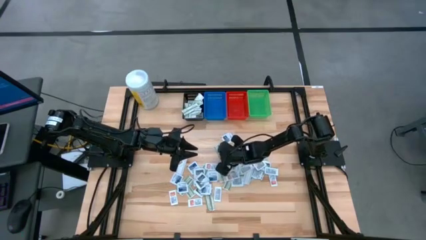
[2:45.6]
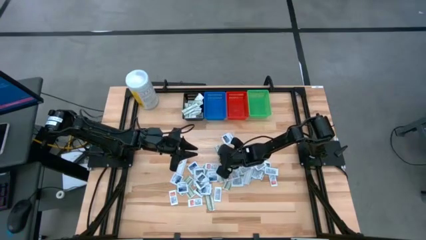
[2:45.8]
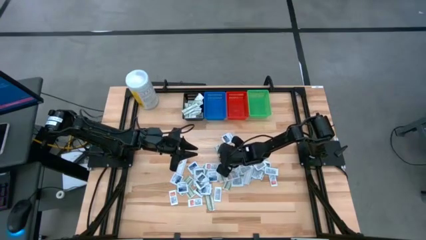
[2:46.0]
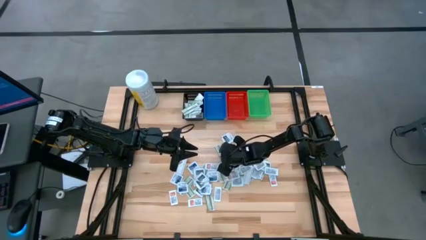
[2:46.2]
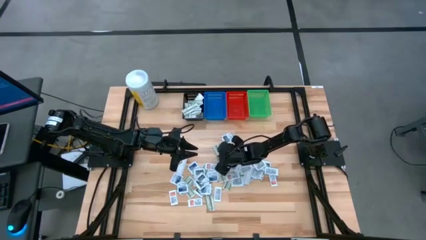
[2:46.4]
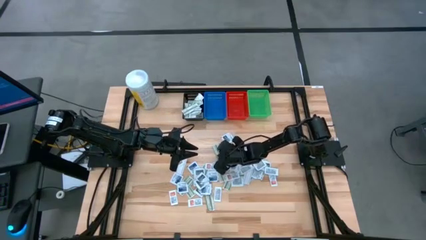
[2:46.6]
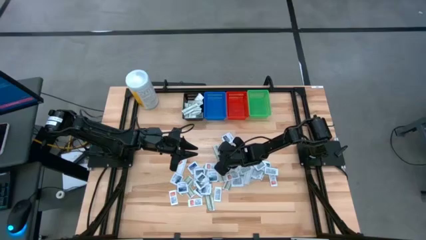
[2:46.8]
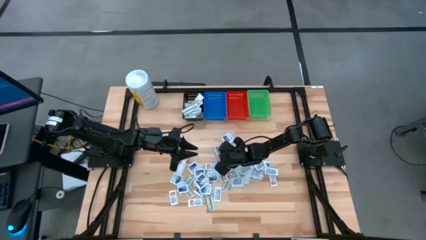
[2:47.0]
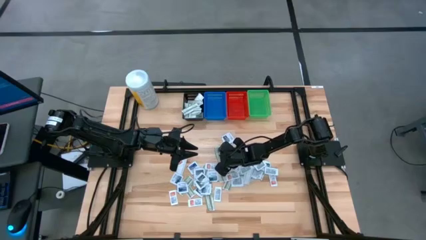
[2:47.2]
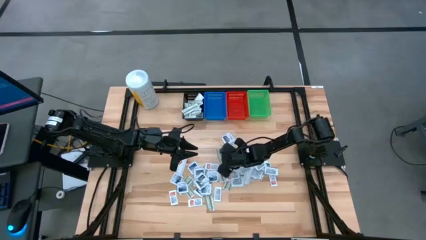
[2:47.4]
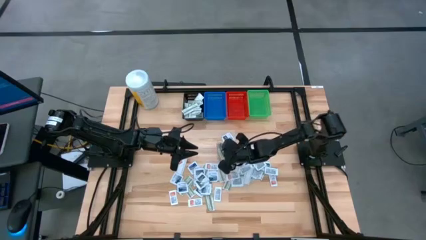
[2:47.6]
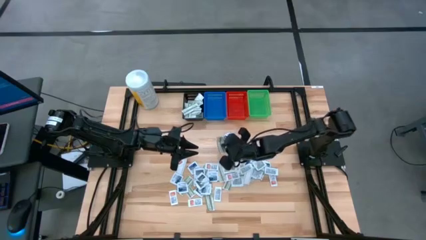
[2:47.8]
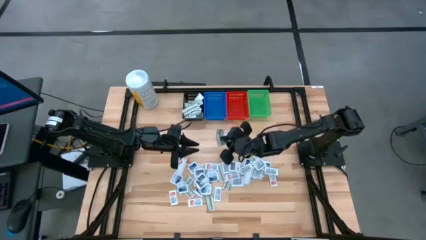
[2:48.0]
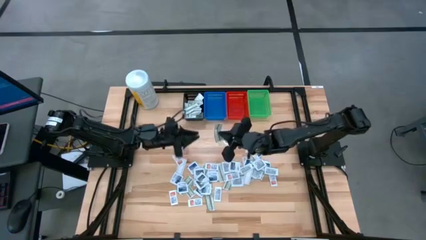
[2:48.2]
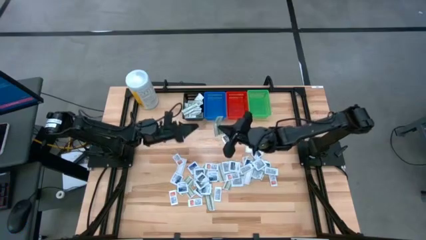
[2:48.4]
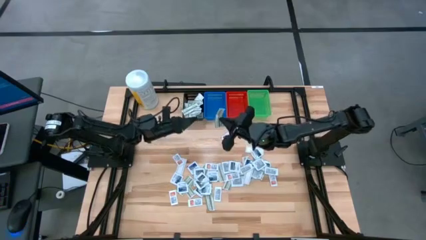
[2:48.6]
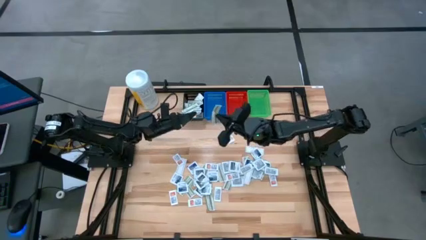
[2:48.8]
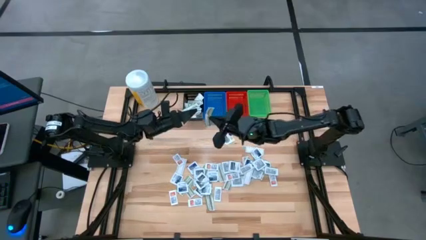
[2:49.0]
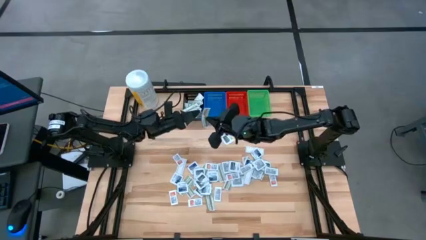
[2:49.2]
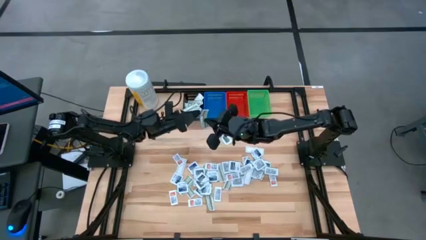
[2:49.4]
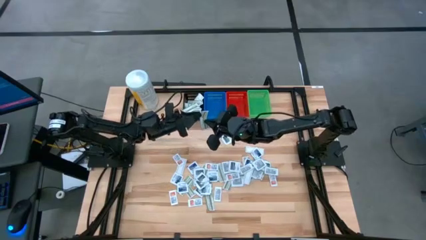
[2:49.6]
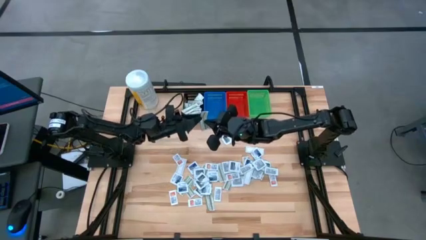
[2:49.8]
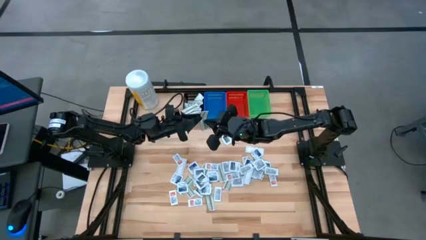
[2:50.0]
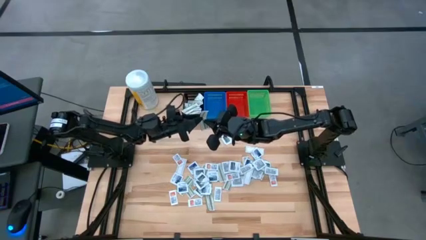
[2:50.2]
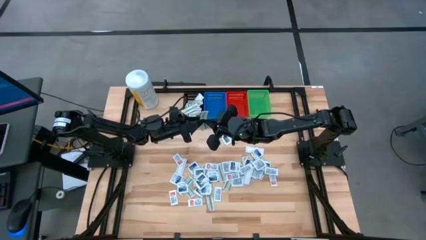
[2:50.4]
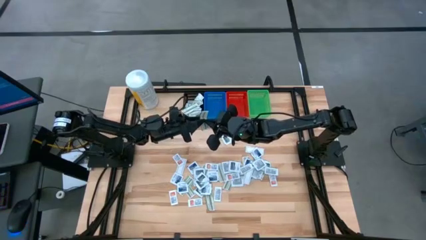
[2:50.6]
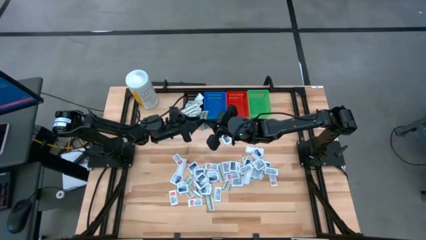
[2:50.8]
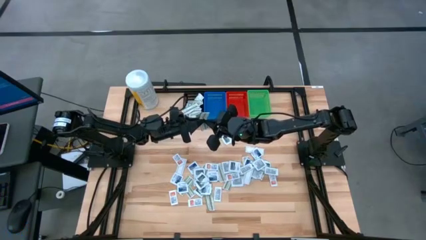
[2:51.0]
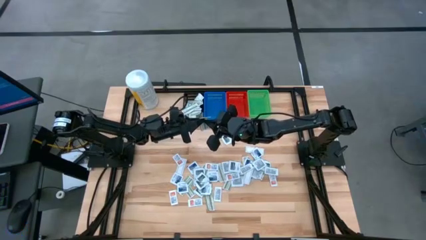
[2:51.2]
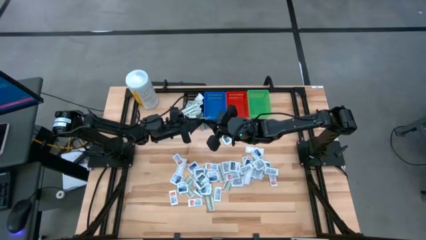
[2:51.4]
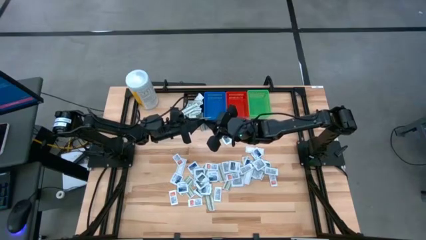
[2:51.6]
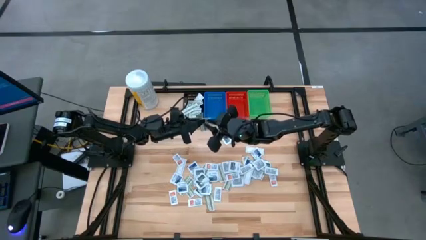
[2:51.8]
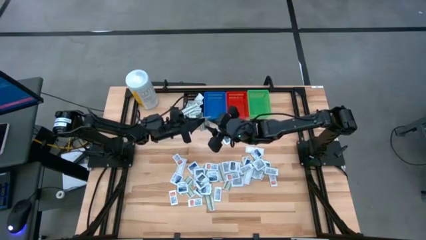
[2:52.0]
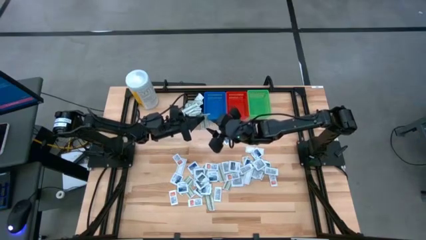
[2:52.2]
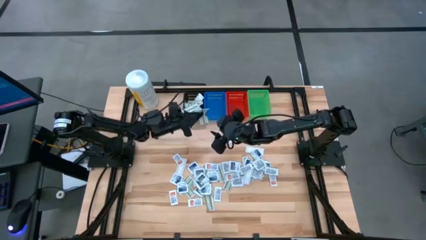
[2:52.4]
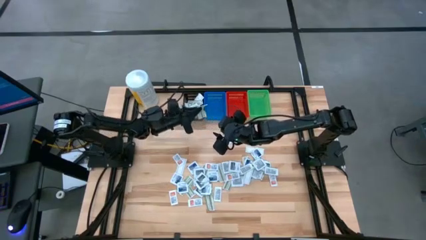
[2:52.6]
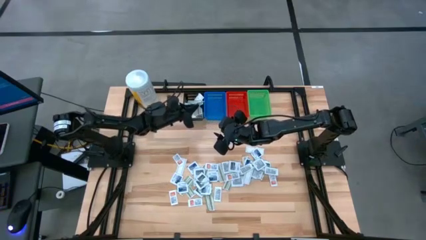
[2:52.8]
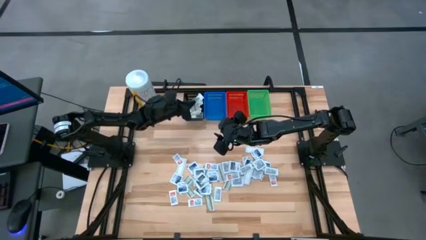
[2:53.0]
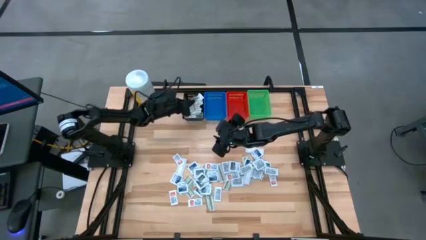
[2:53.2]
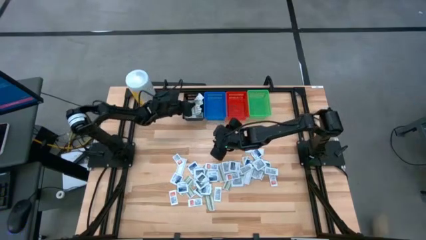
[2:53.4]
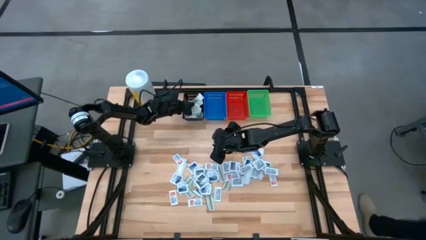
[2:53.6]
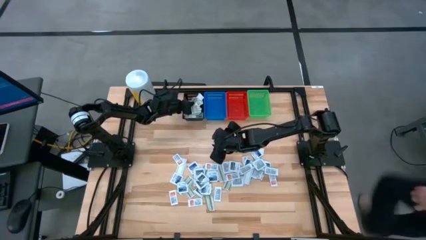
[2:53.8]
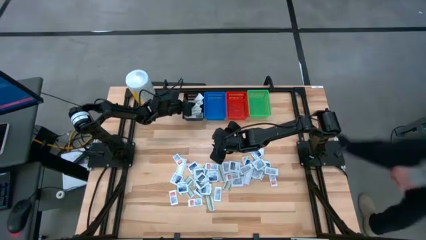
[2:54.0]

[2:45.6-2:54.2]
Task: Pick & Place First Aid Supplies
Put the green bandage pack in the black bin

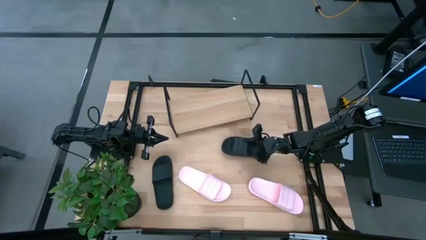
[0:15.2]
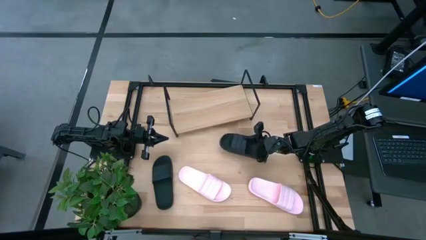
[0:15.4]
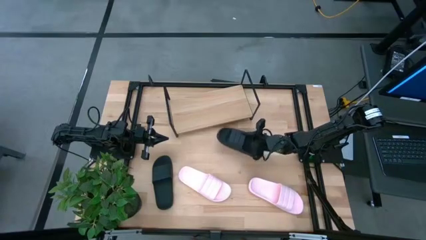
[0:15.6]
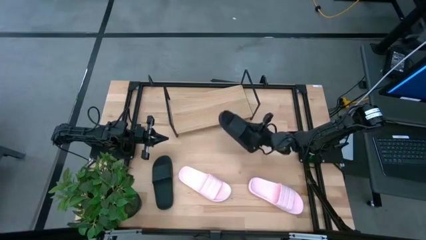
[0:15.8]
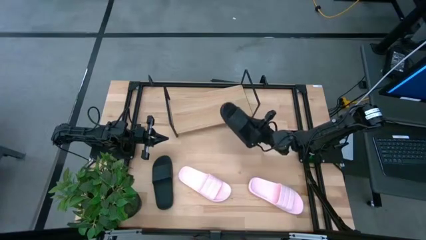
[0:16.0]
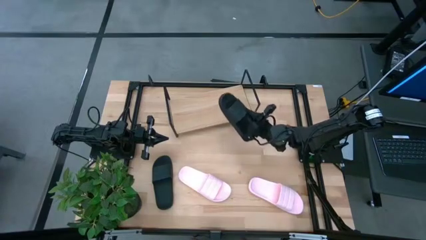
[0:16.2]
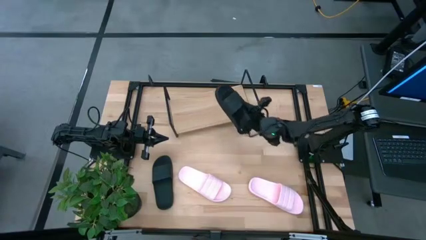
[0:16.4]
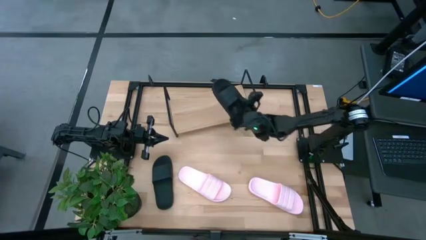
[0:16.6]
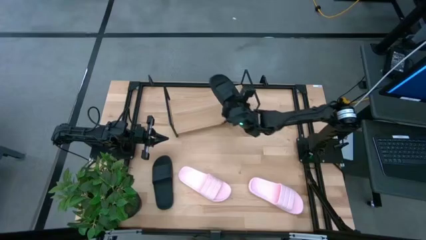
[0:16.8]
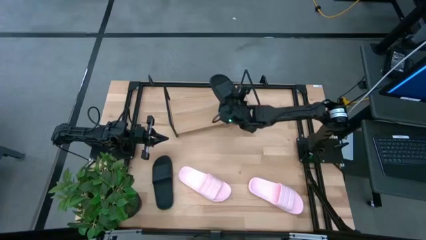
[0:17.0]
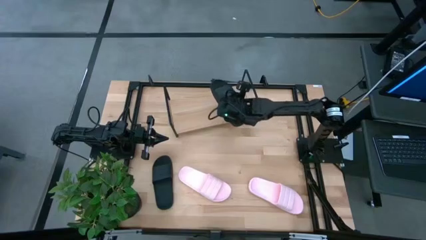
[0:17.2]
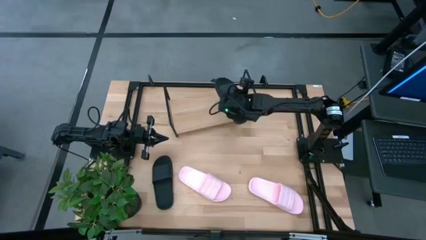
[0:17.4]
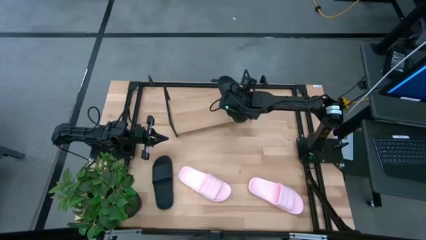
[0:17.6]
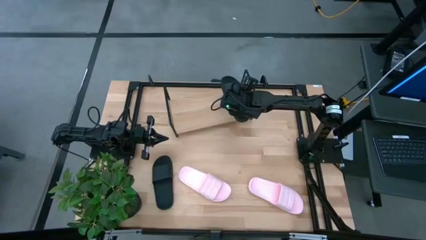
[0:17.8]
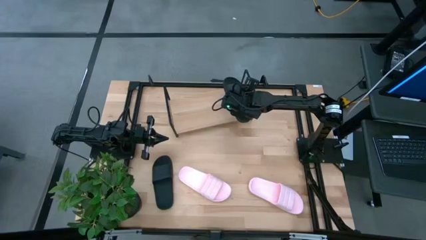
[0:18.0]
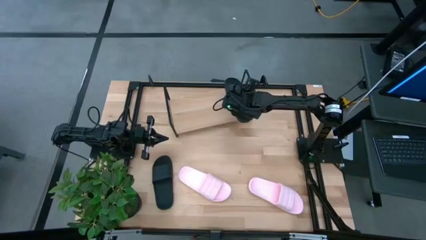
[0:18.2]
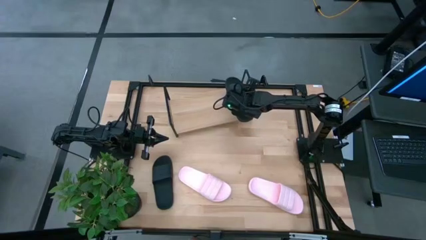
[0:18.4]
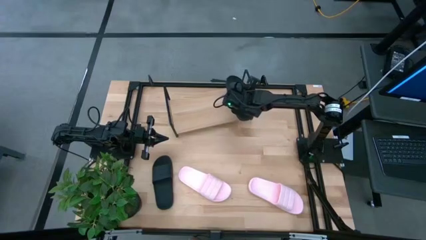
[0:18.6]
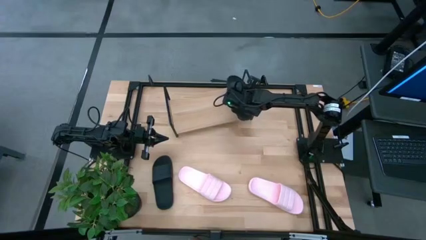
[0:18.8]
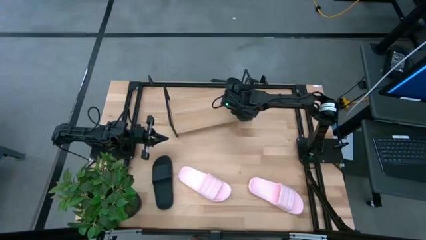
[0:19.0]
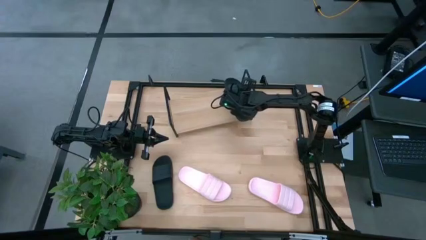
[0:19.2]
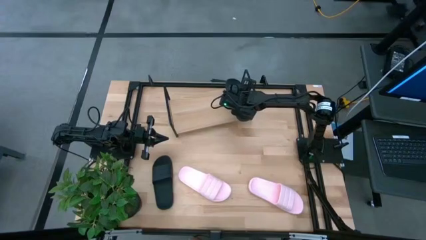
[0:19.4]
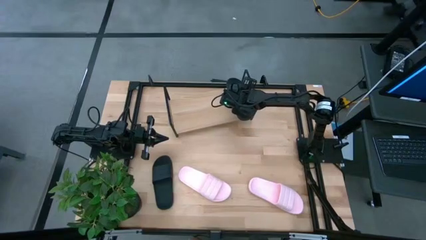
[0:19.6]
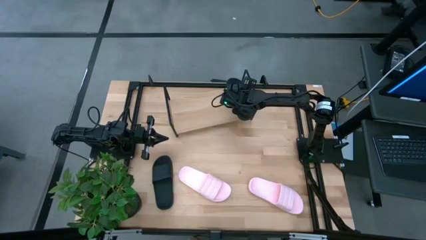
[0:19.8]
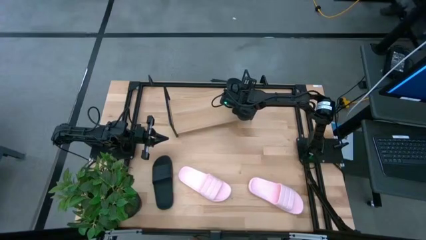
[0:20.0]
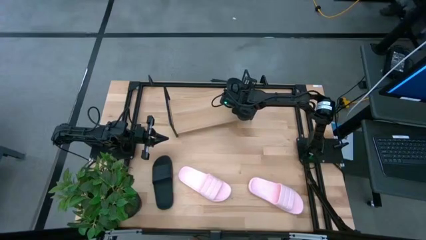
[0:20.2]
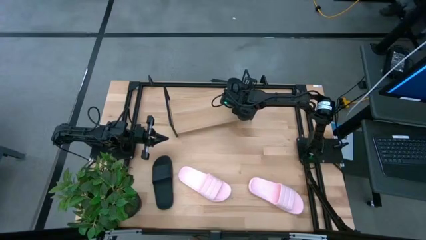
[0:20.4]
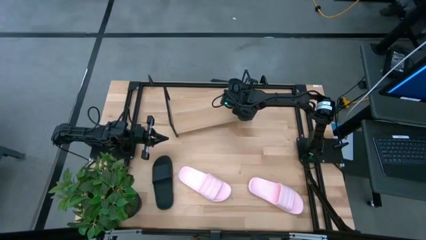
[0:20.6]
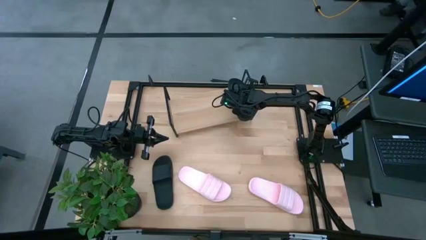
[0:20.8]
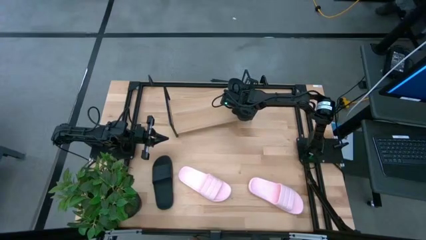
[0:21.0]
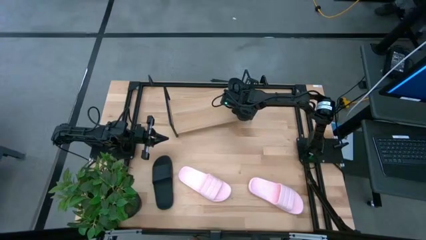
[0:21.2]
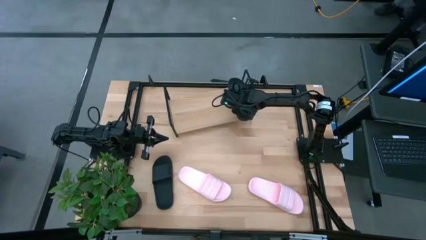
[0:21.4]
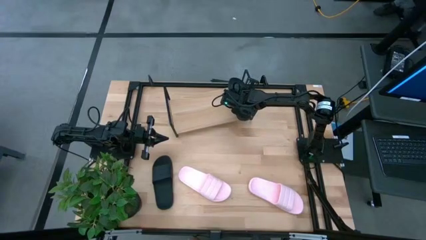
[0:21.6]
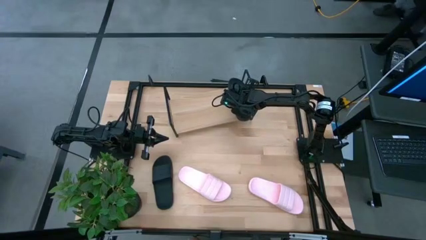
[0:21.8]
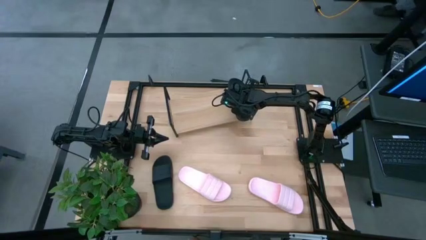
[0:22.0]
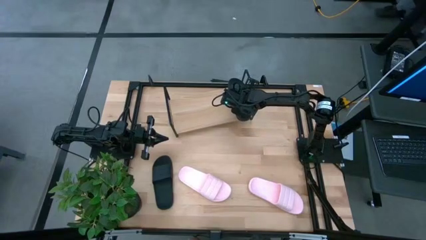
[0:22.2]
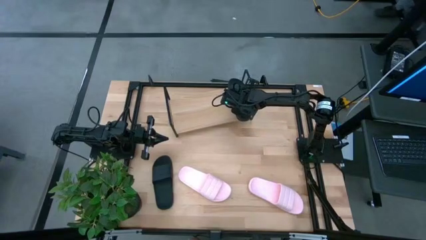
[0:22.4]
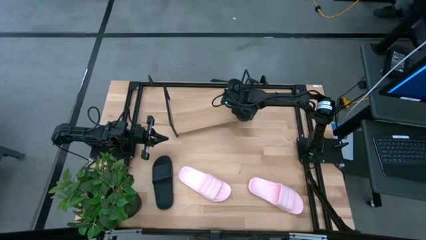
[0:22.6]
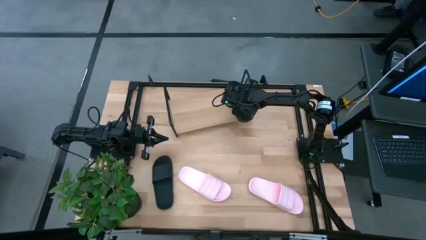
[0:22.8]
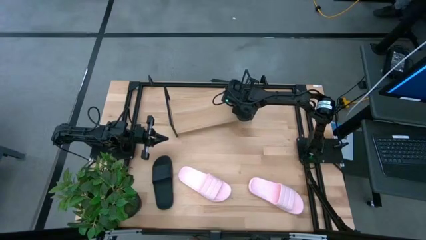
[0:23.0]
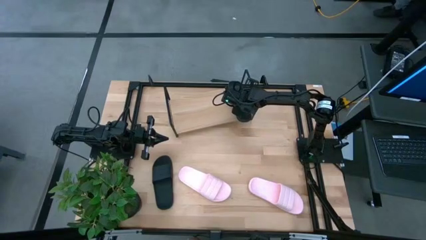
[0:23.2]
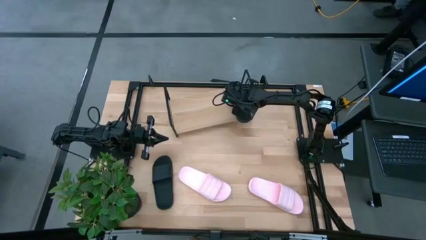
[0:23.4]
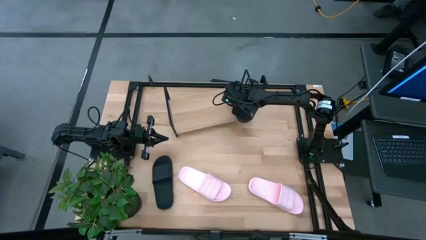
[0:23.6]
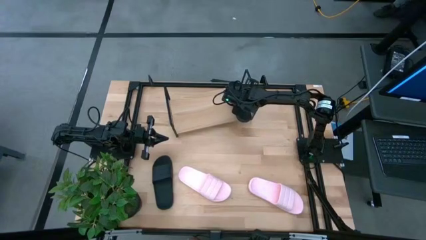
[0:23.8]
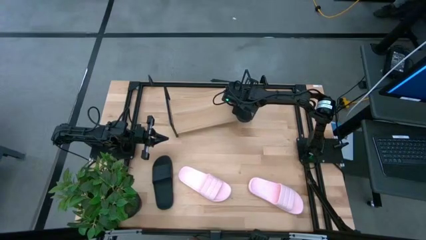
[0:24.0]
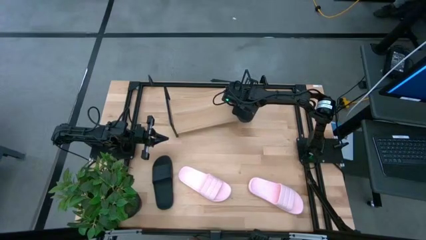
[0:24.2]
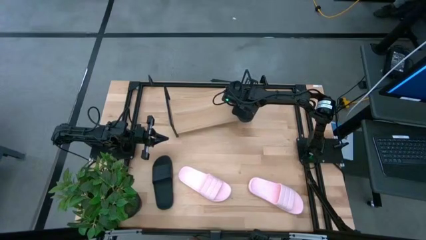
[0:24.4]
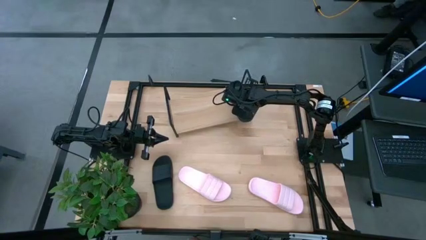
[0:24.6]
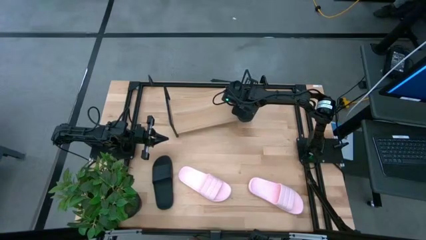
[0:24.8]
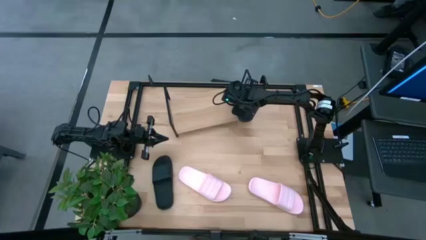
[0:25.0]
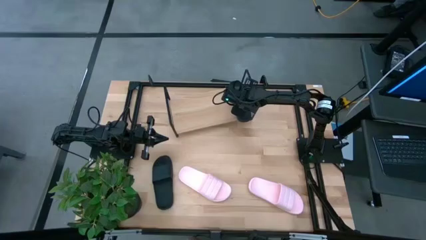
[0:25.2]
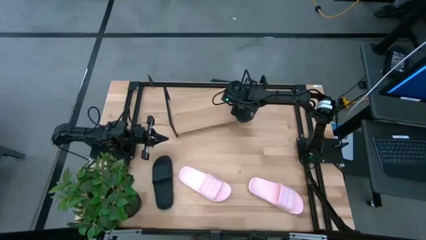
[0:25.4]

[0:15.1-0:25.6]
Task: Pick and place slides into the shelf
Put the right black slipper on the shelf
